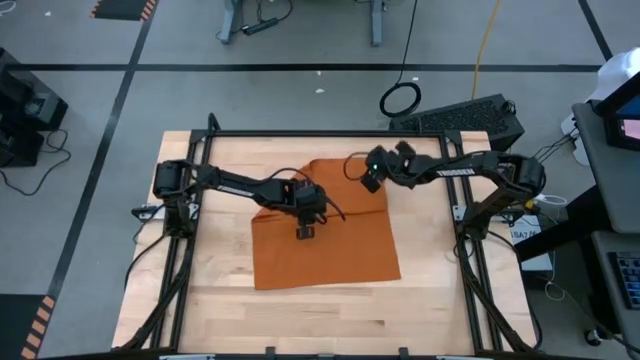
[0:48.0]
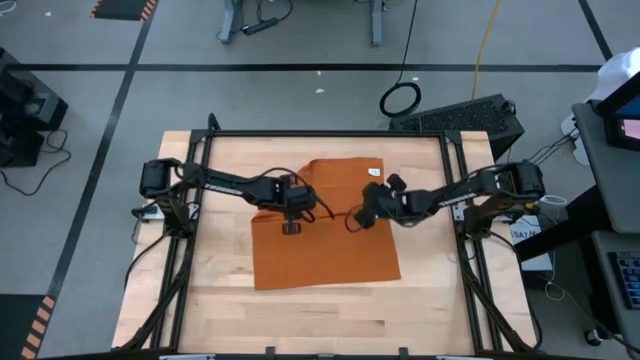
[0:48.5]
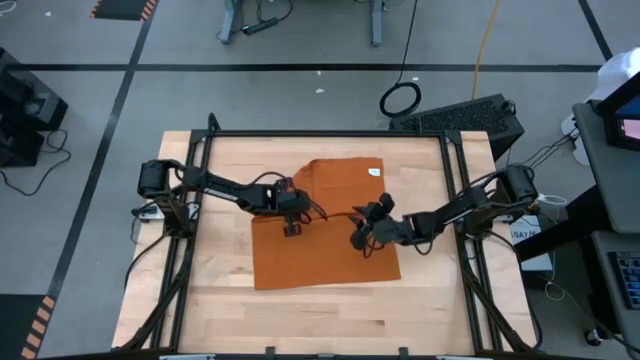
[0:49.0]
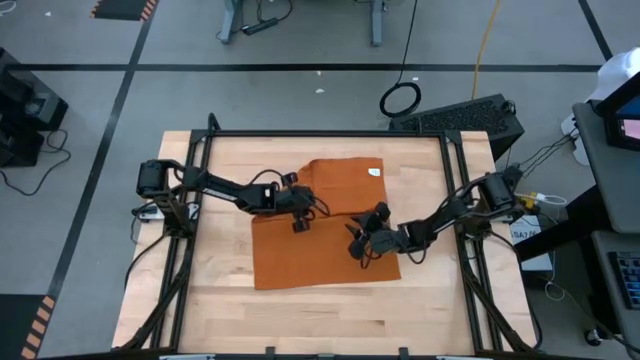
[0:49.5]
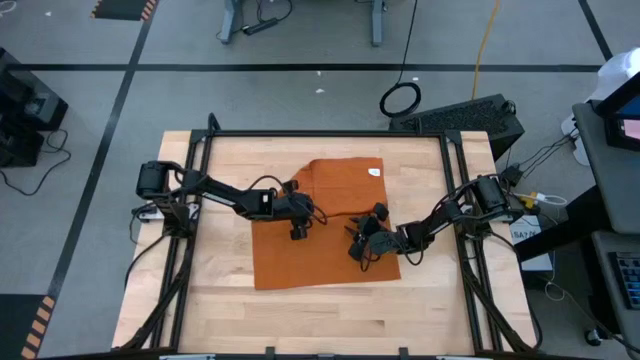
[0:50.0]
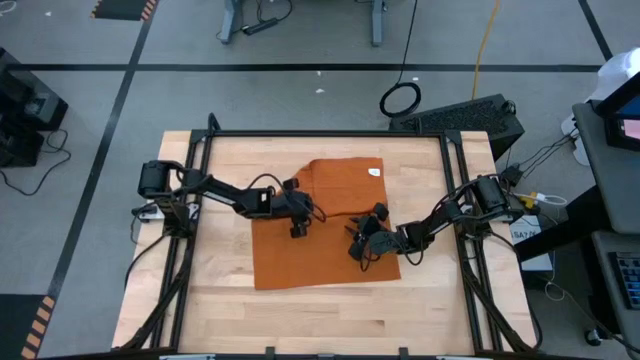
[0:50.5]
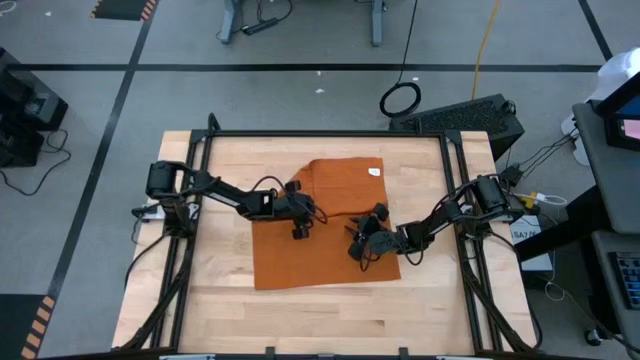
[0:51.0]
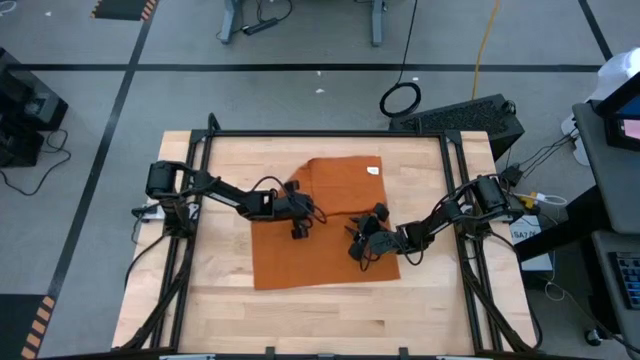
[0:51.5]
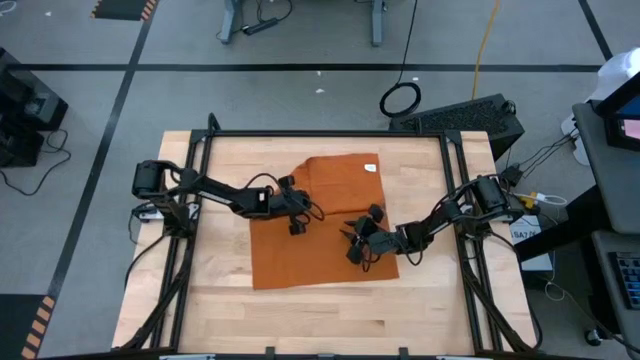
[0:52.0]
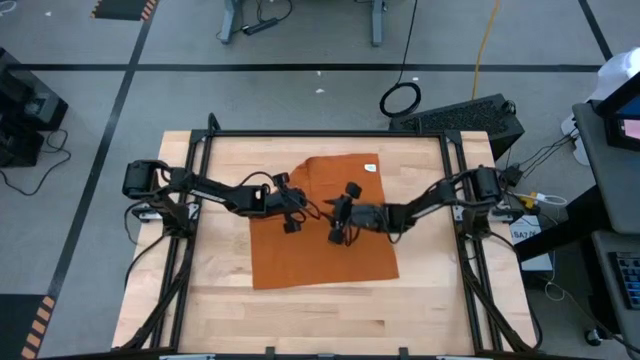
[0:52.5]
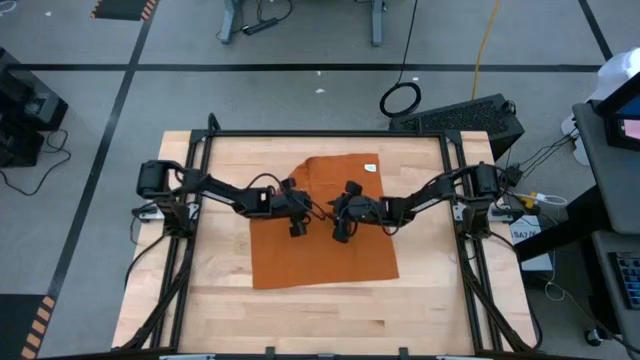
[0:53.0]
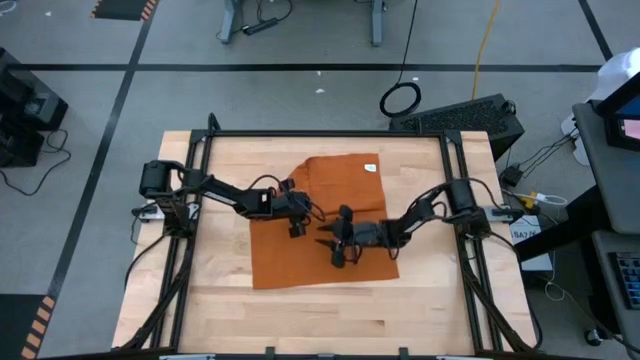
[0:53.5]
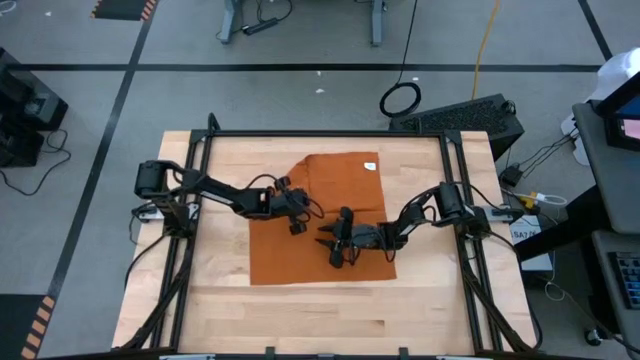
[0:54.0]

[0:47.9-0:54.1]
Task: Roll towel into tight, uniform cylinder
Fold the brown towel

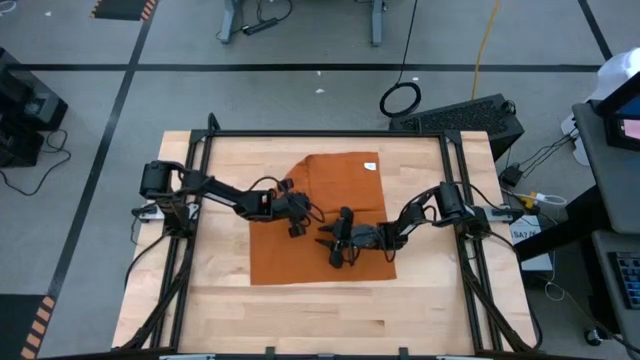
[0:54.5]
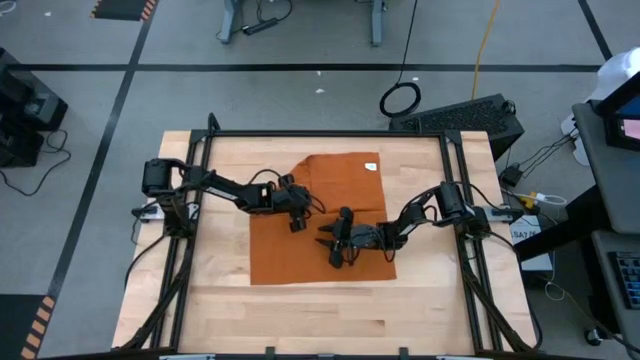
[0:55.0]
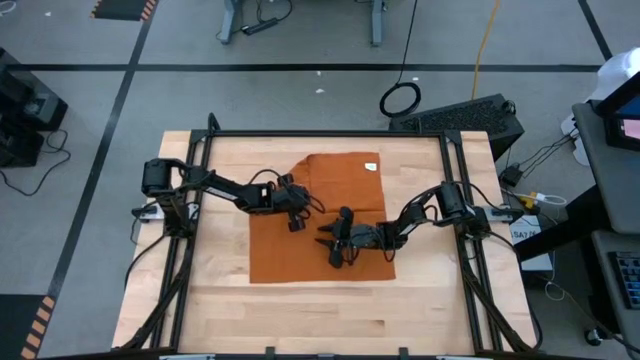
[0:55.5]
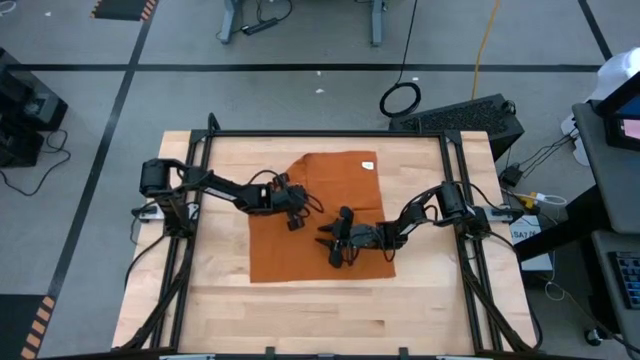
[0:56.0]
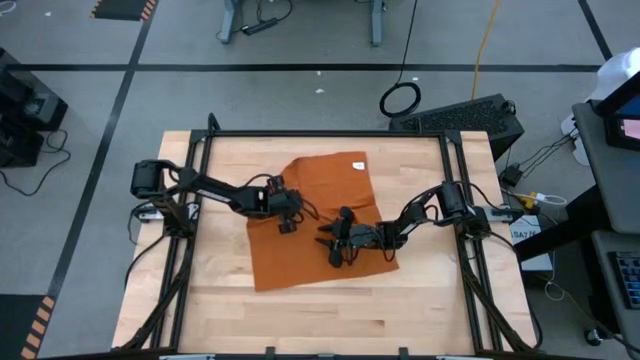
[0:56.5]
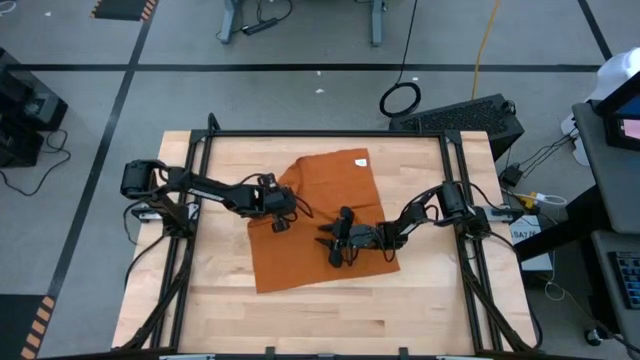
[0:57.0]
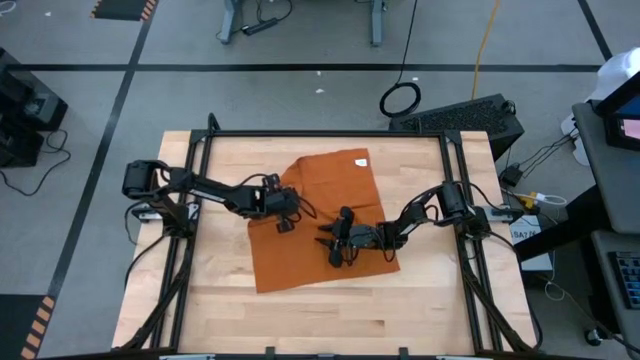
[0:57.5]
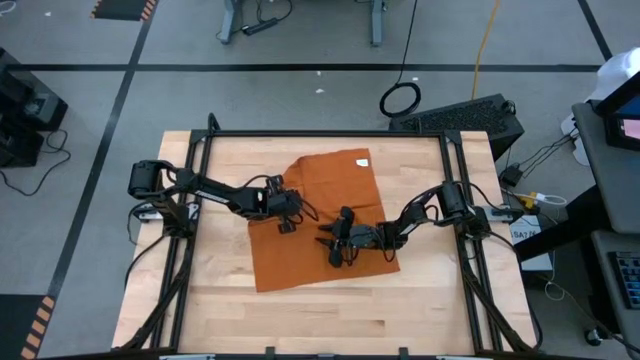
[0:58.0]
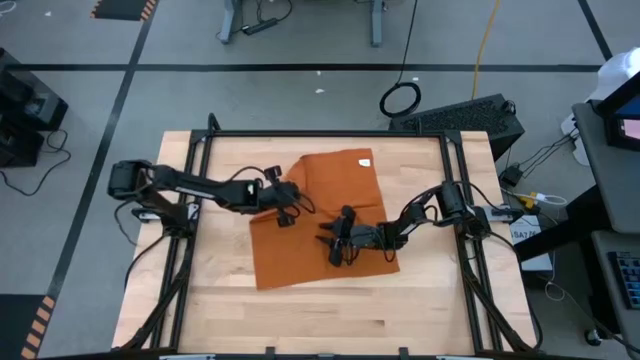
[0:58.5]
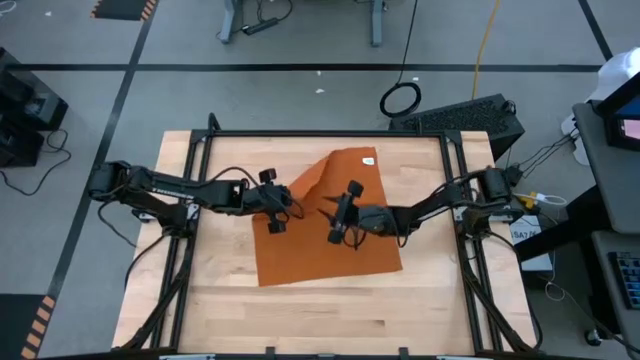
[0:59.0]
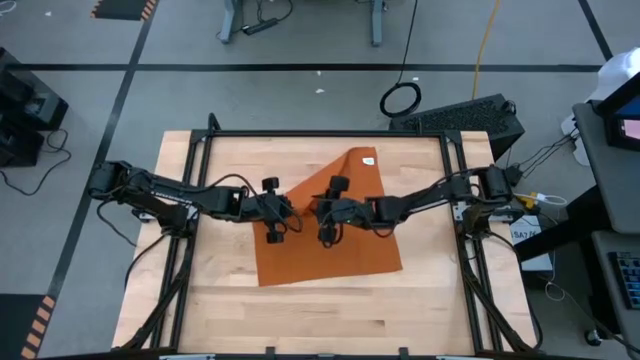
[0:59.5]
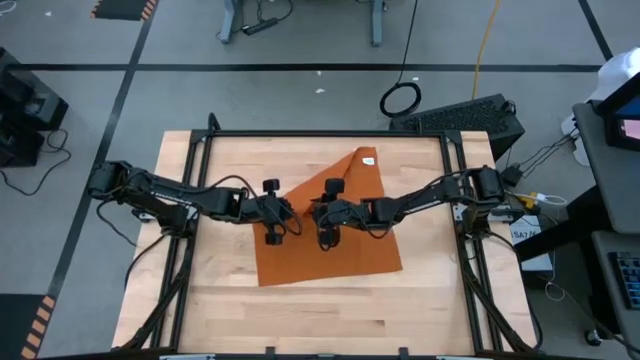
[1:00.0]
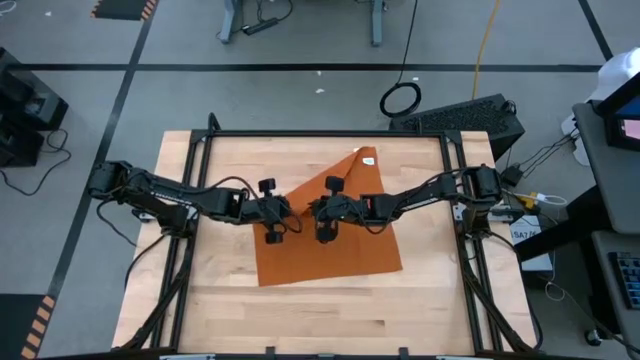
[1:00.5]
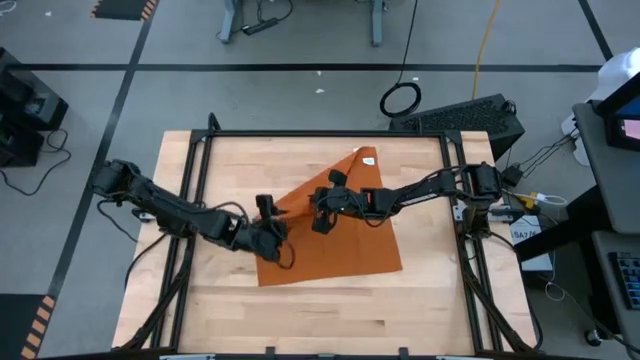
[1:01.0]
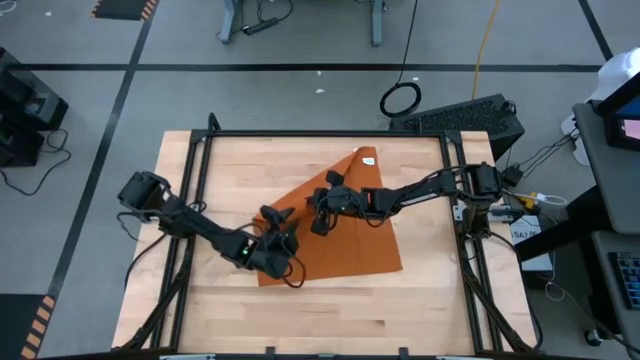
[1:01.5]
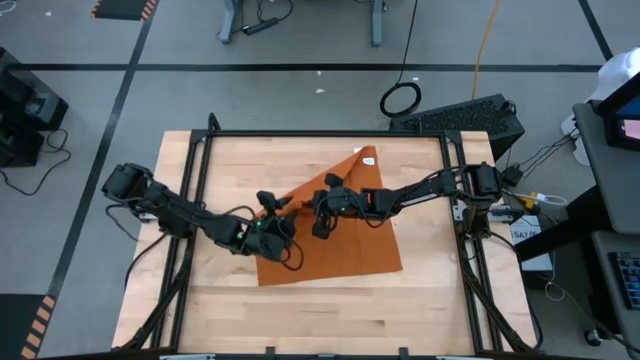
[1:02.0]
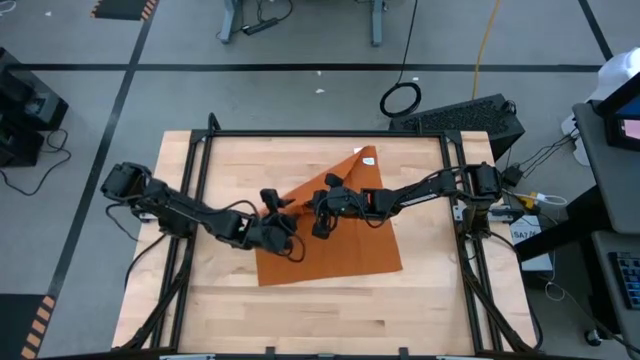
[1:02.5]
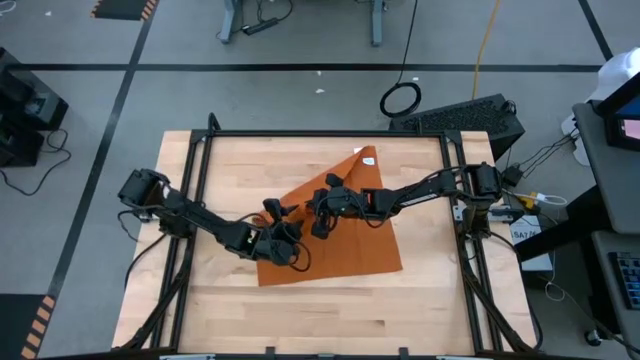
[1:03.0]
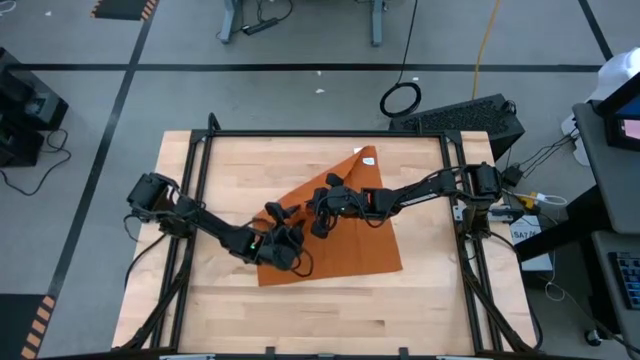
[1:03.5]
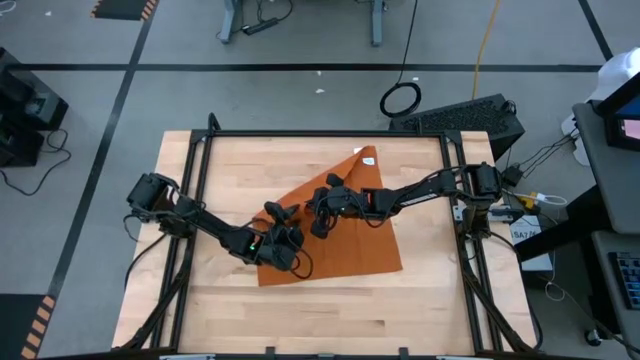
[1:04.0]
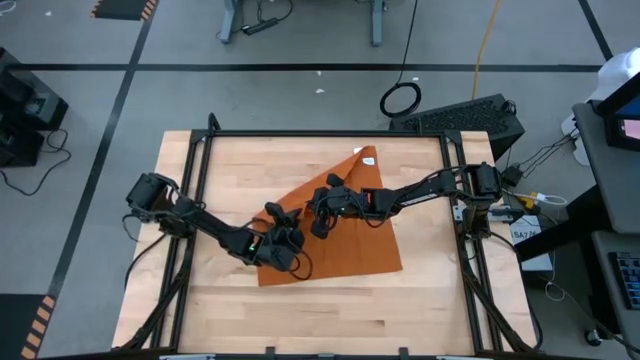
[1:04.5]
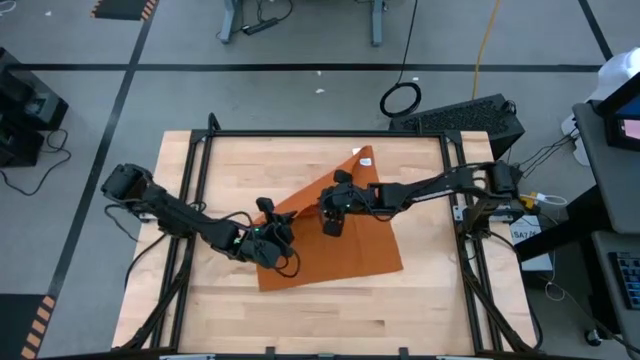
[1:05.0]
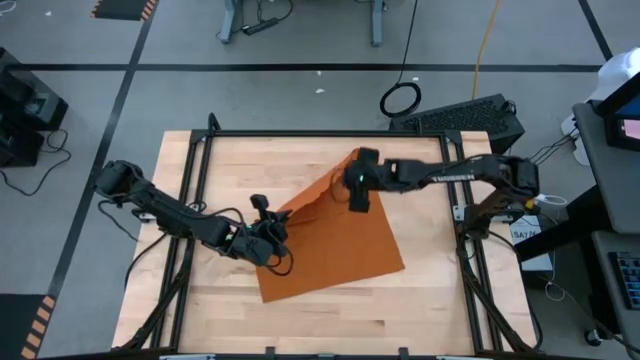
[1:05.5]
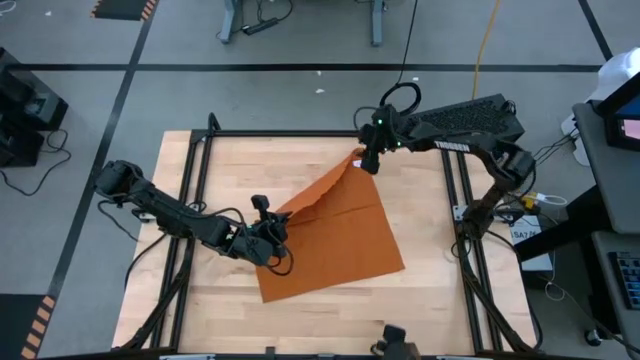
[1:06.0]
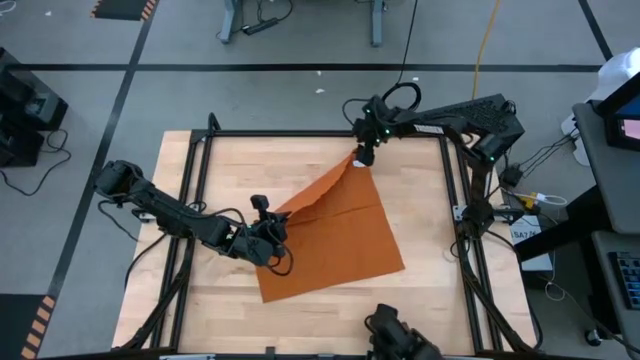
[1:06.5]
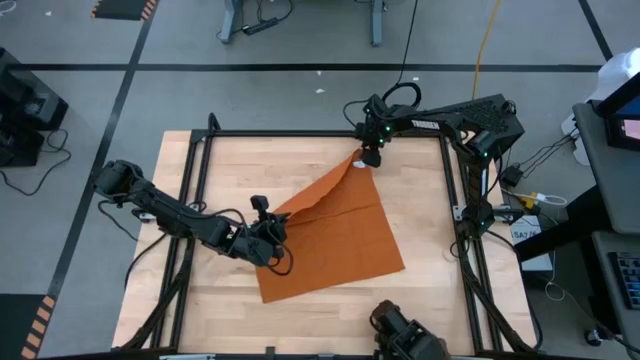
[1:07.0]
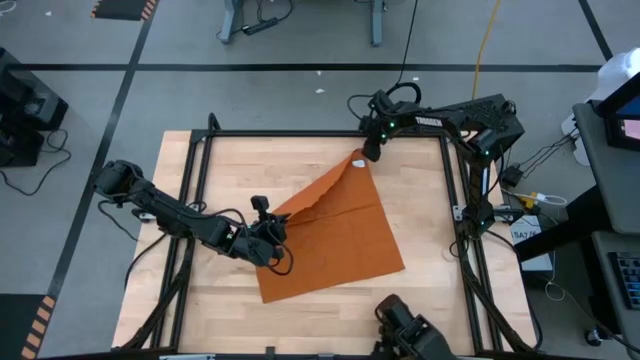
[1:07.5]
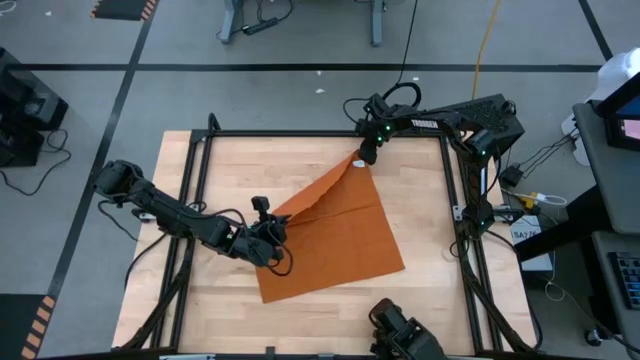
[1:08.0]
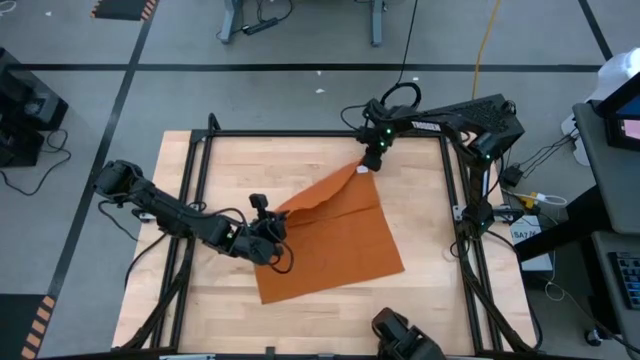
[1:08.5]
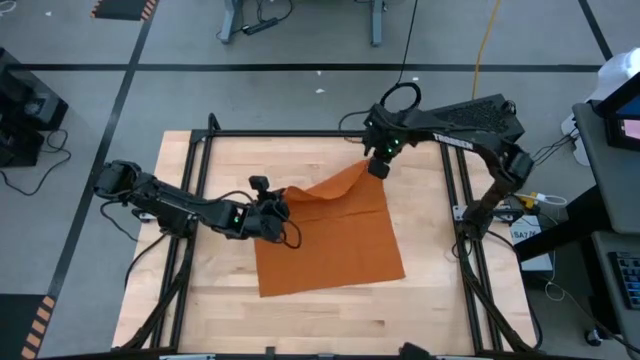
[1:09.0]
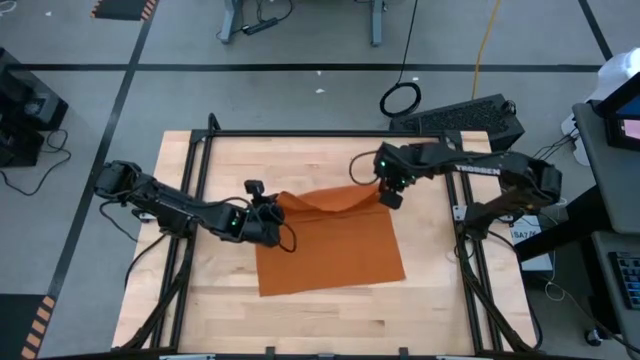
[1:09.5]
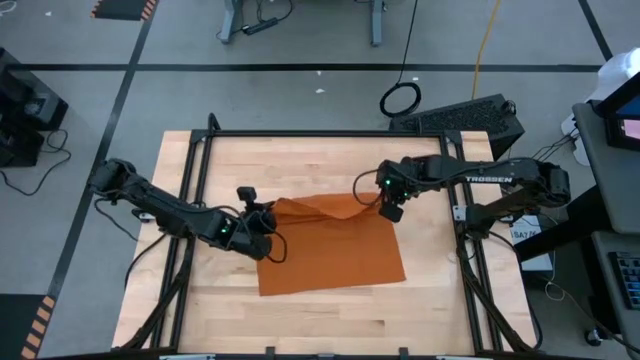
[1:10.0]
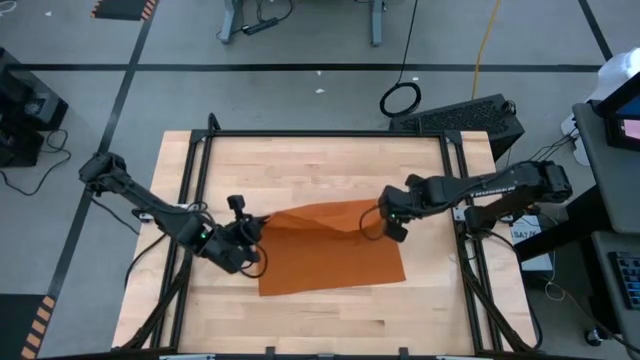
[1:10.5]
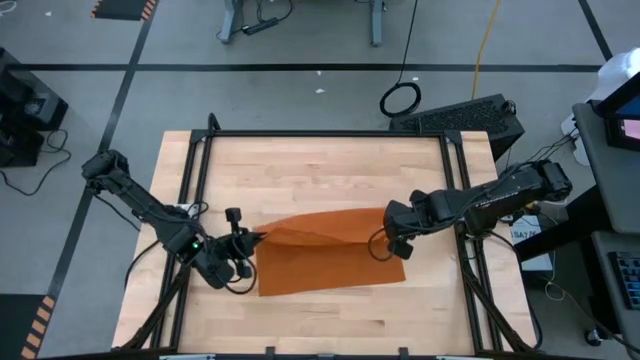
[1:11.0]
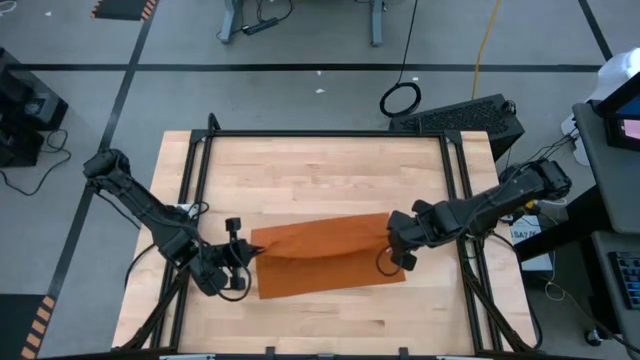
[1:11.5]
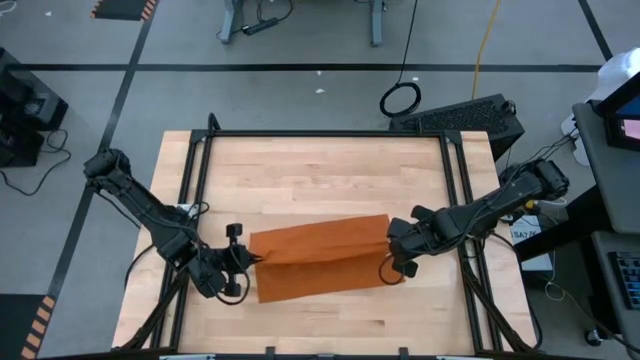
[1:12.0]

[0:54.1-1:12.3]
Fold the brown towel
